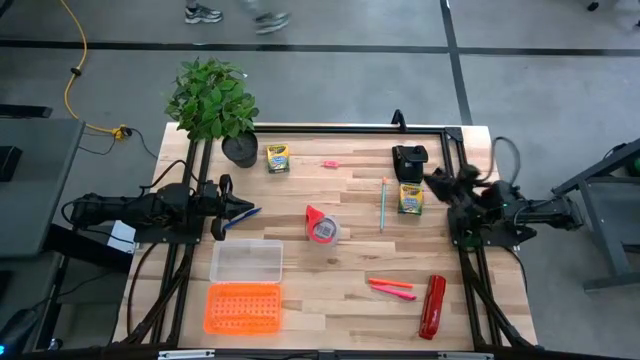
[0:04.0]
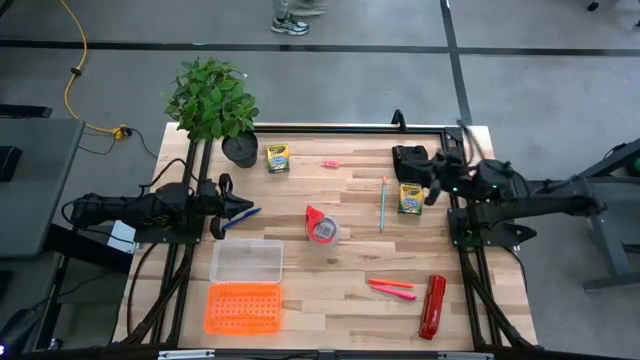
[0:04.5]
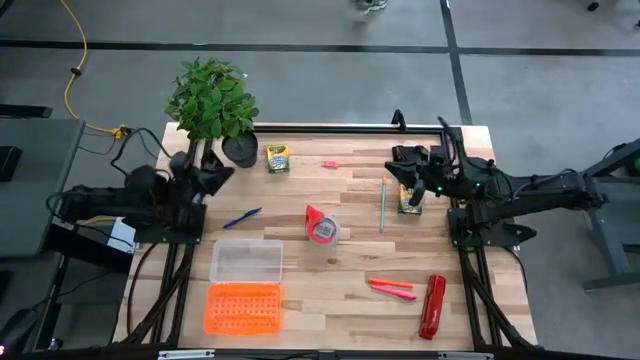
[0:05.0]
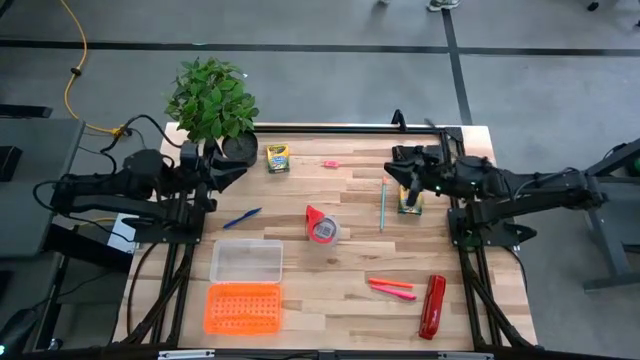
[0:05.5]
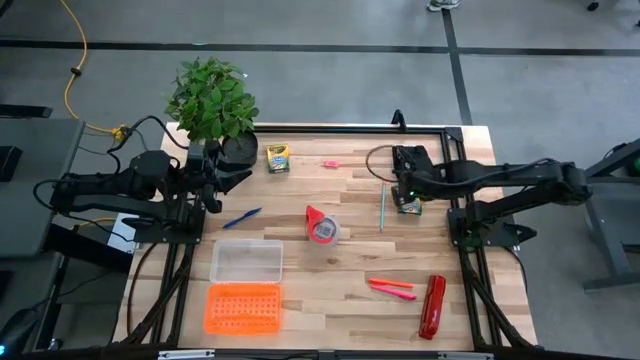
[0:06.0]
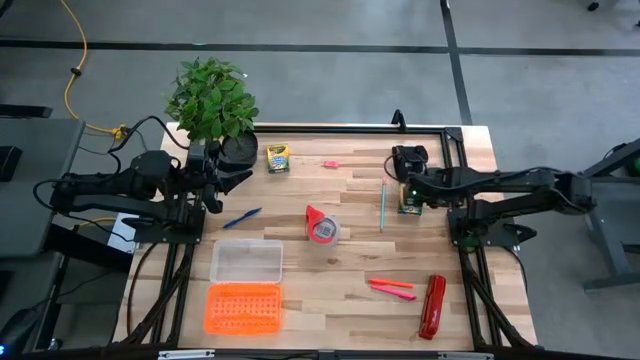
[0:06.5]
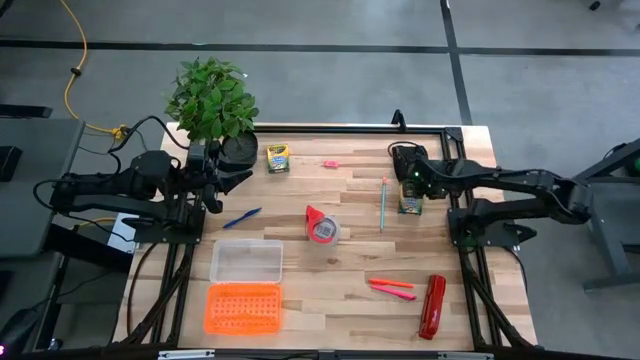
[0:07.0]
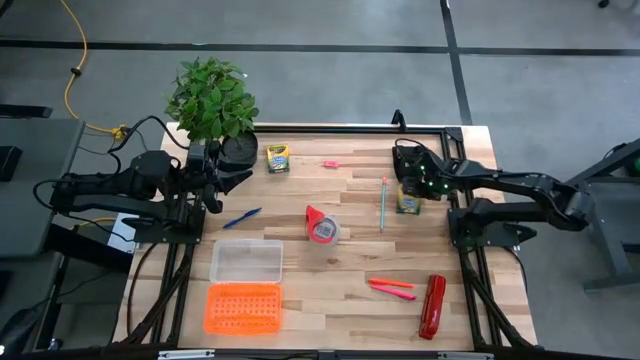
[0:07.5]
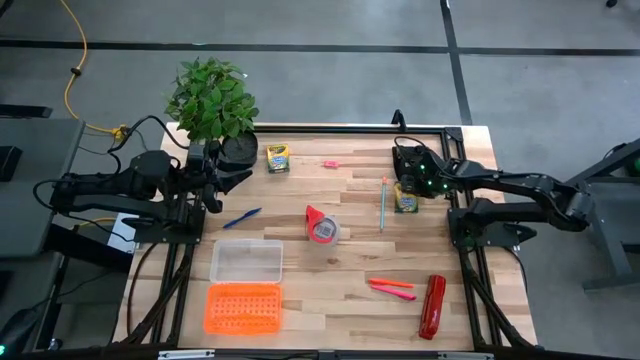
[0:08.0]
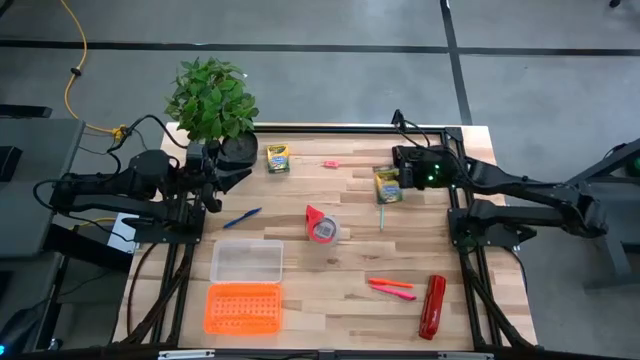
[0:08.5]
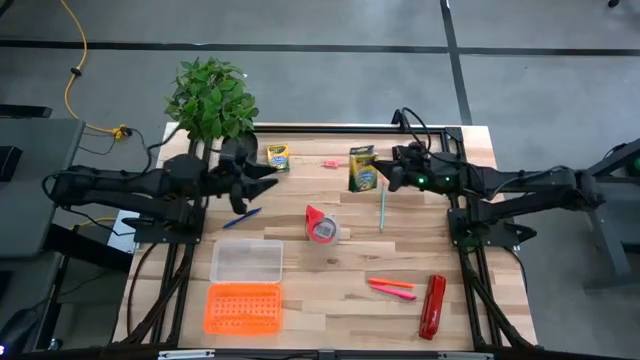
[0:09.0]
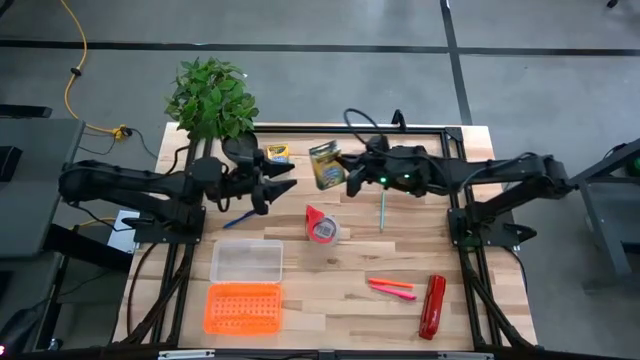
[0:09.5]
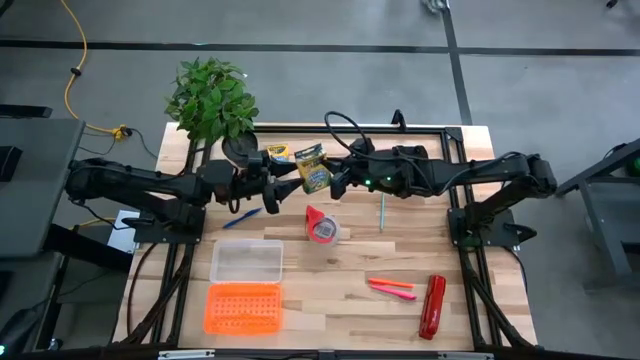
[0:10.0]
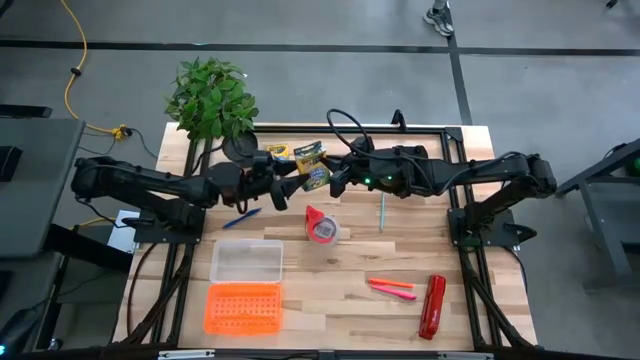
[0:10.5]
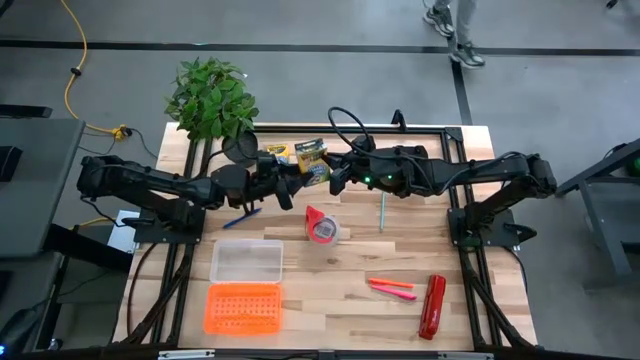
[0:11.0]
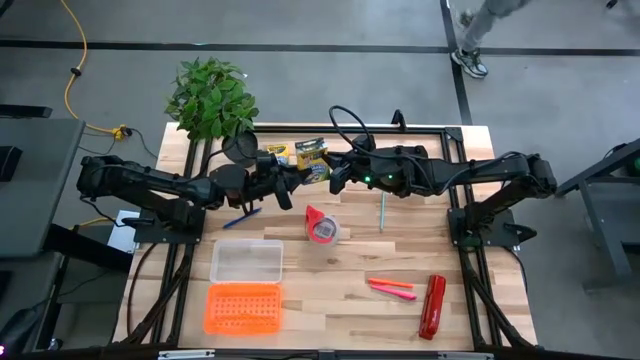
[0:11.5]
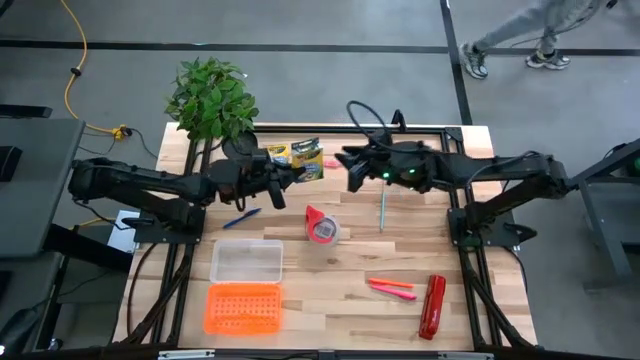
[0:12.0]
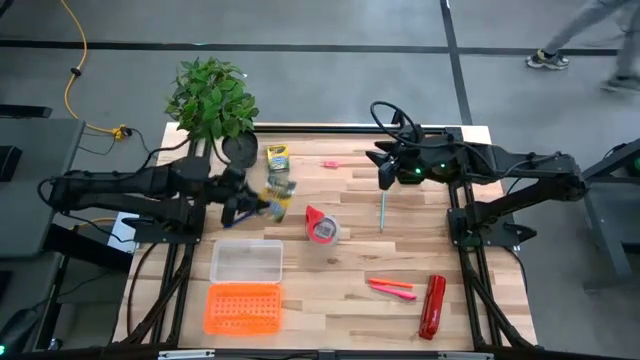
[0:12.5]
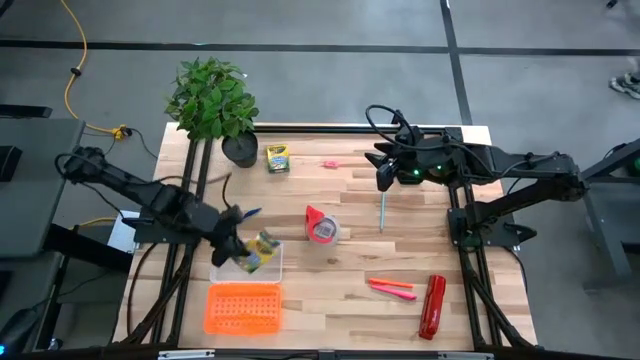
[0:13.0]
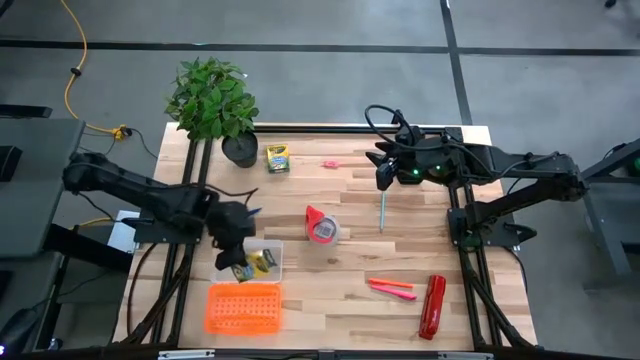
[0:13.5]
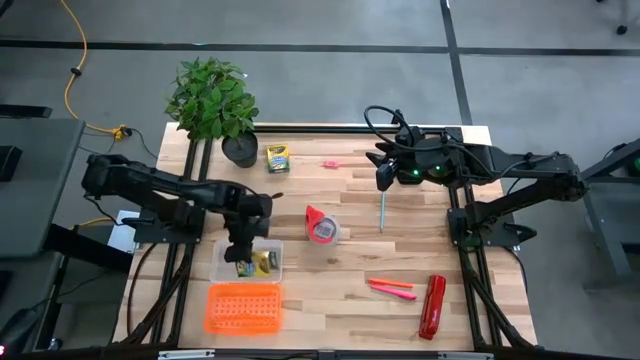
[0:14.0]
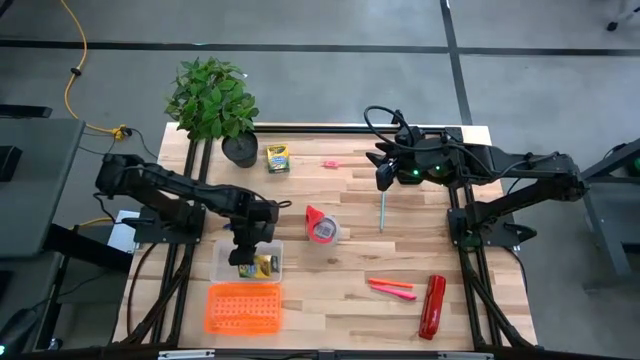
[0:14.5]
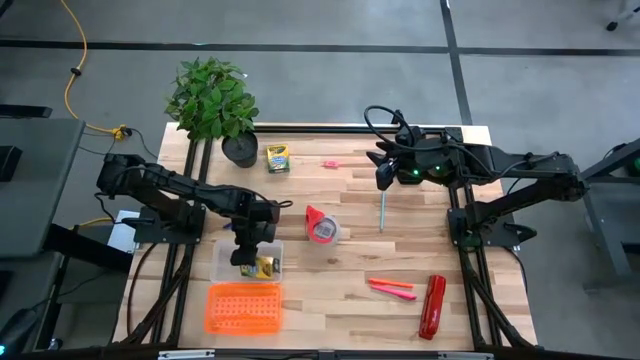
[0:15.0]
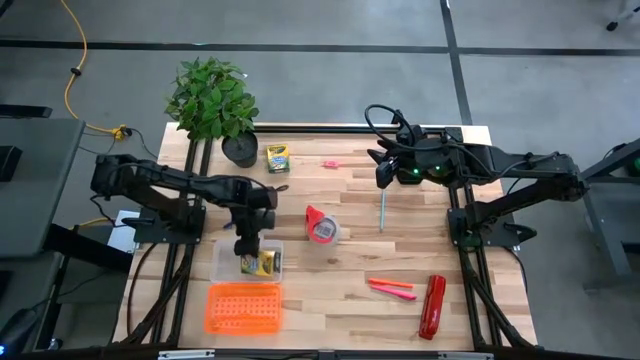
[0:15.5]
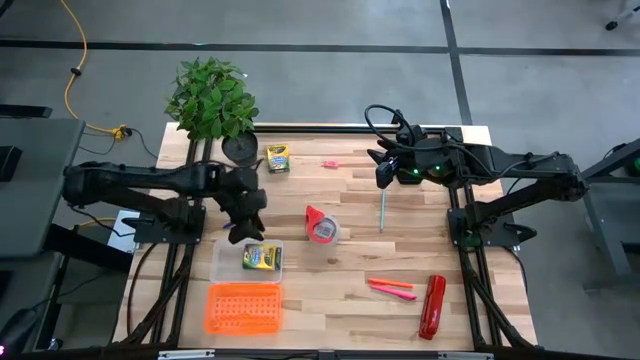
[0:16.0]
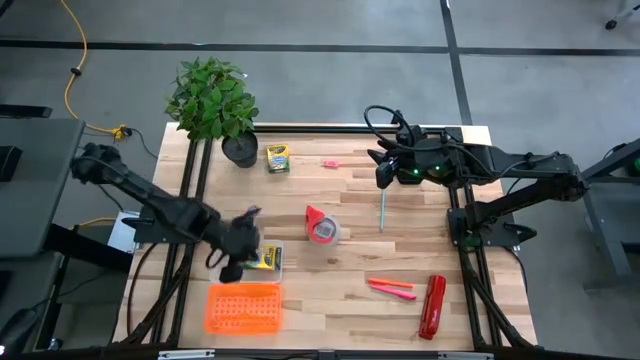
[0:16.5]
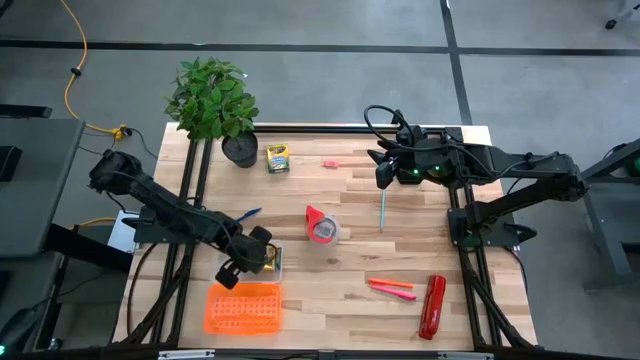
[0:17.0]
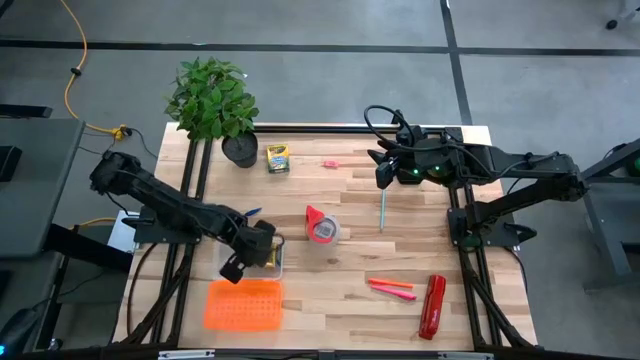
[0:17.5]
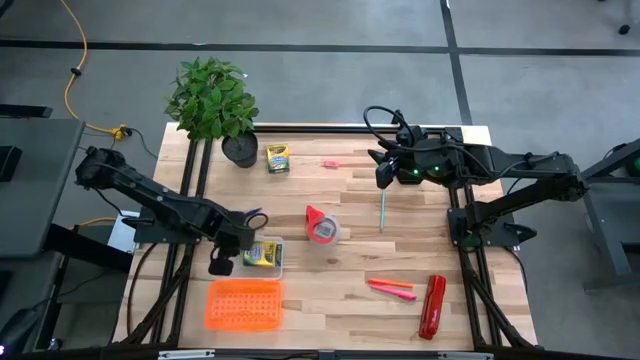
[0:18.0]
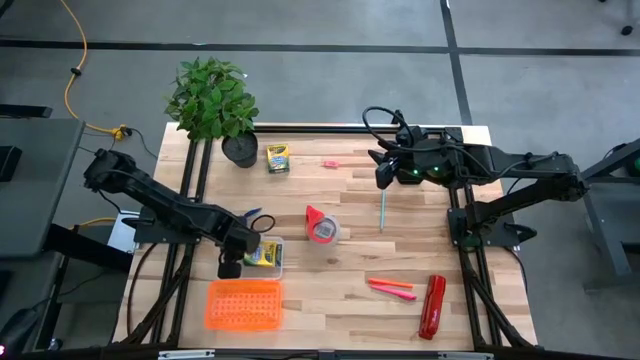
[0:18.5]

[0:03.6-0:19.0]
Task: Pack school essentials
Put the yellow crayon box into the orange supply box

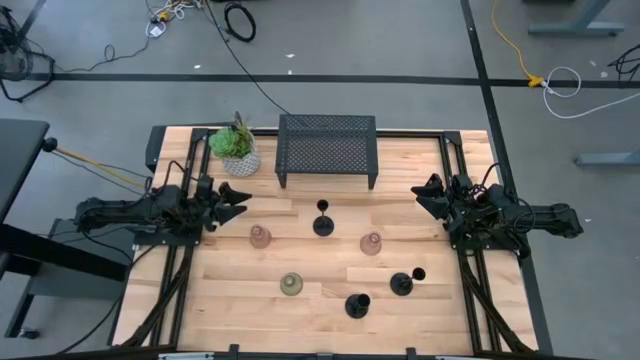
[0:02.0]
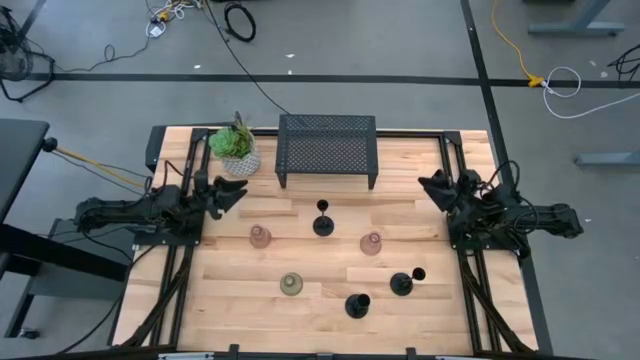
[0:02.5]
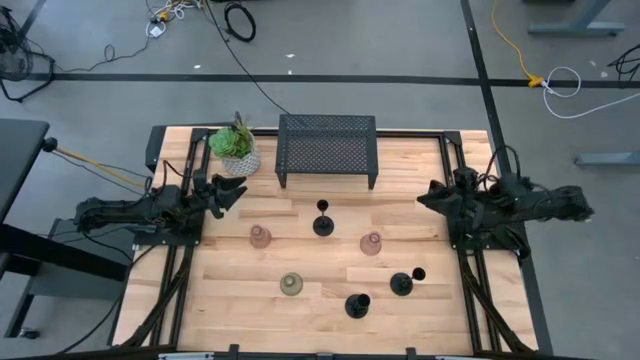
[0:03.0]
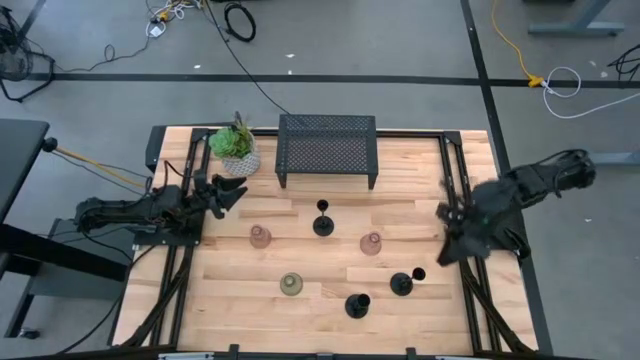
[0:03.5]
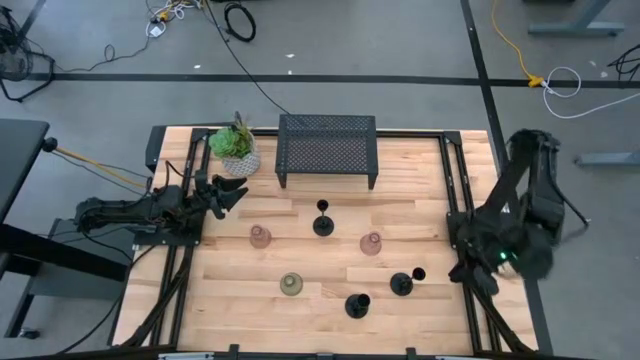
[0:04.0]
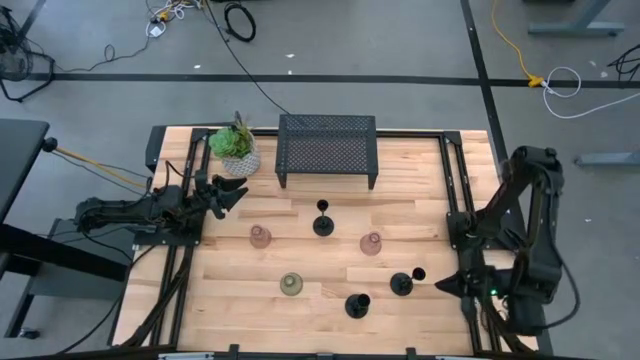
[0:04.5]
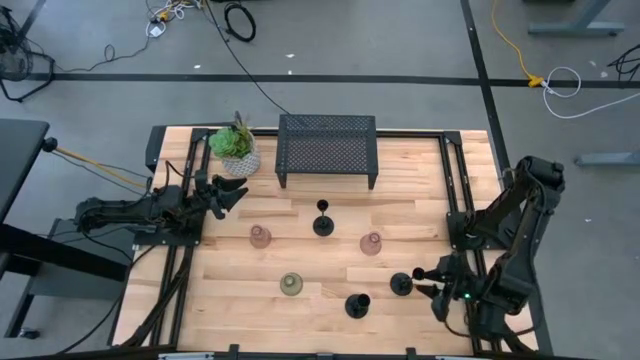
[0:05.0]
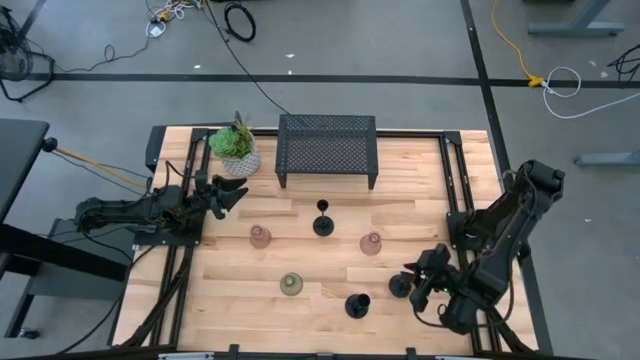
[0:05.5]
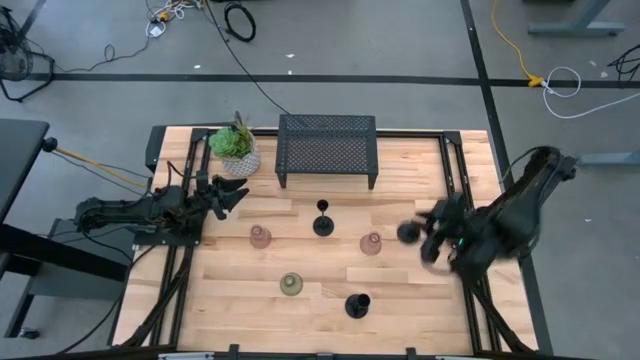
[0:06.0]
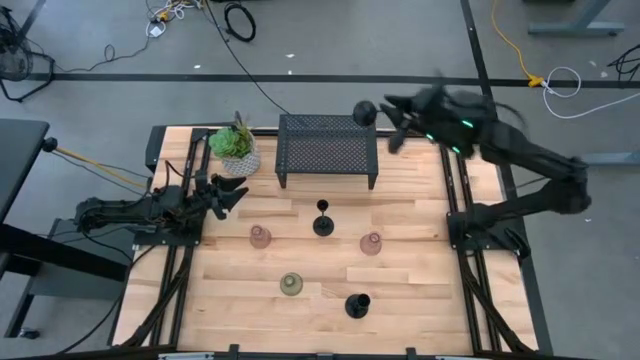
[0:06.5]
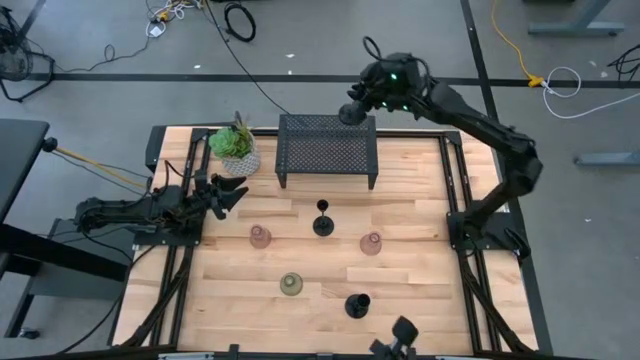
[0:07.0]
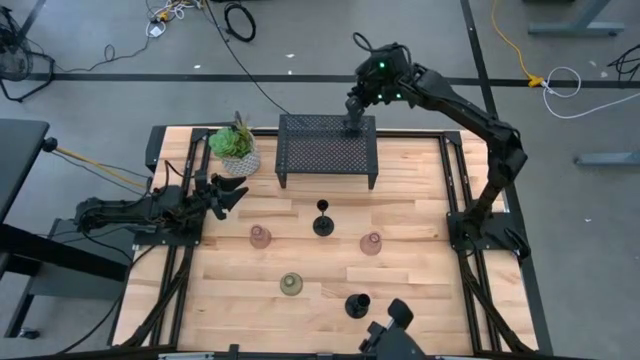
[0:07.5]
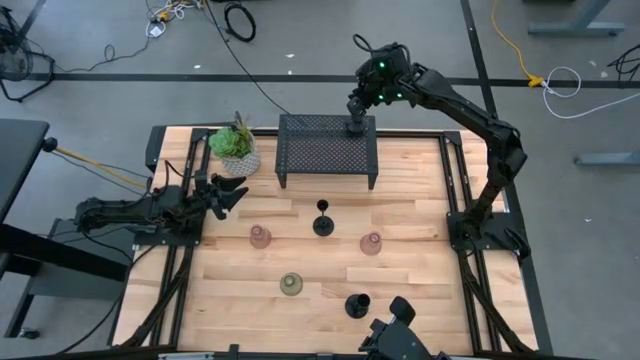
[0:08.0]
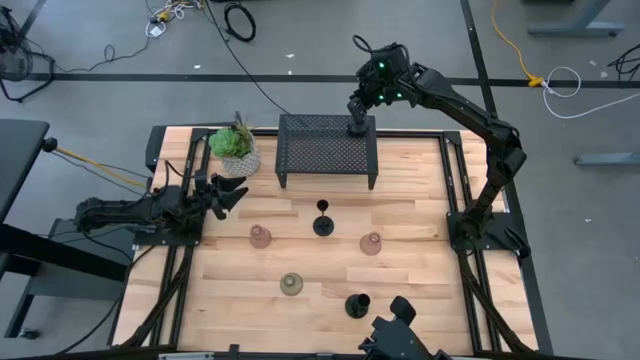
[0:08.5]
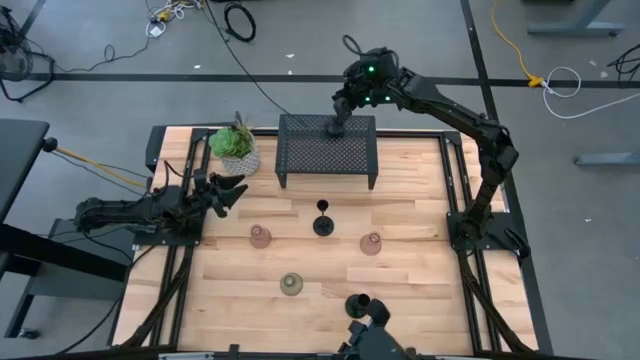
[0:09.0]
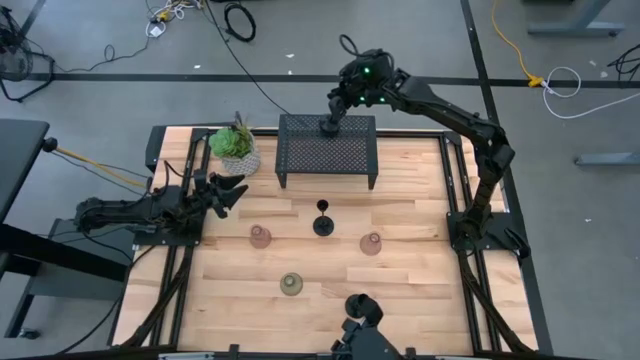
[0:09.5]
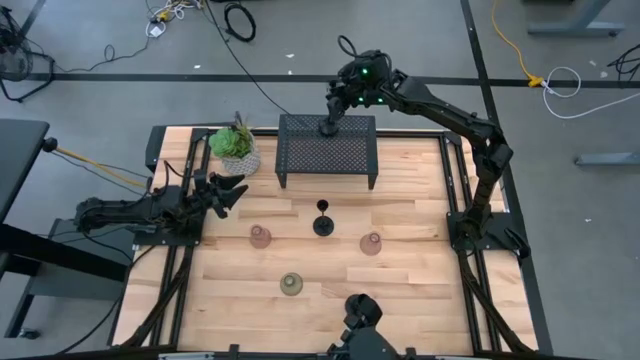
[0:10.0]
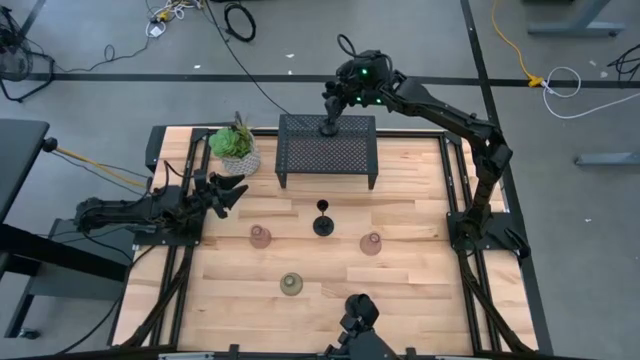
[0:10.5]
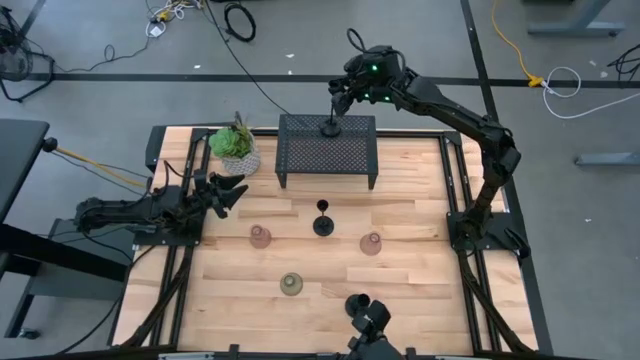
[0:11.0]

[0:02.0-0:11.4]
Task: Pick & Place candle stick holders
Put the bottom right black candle holder on the shelf
